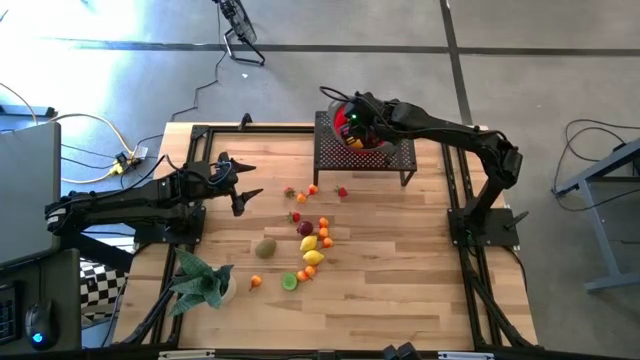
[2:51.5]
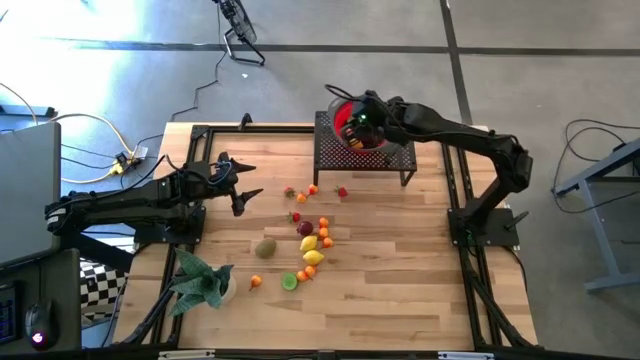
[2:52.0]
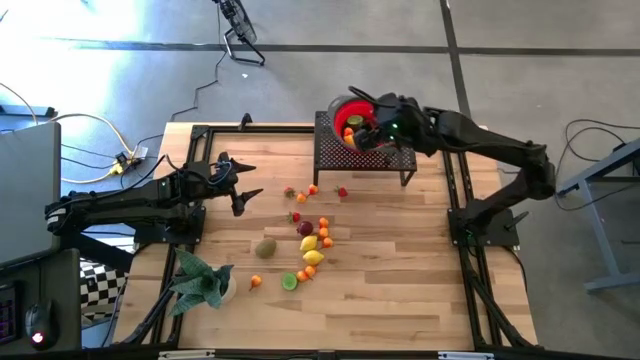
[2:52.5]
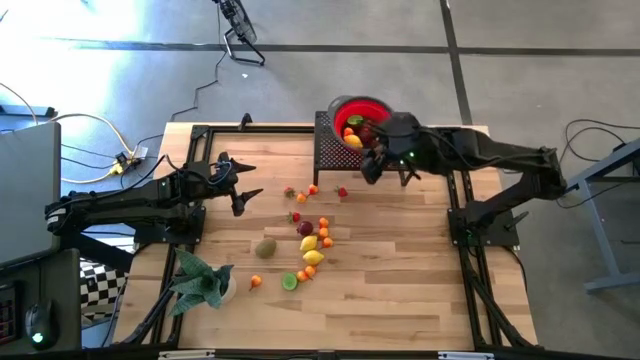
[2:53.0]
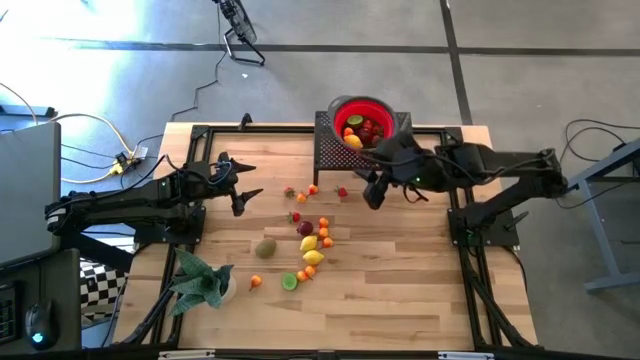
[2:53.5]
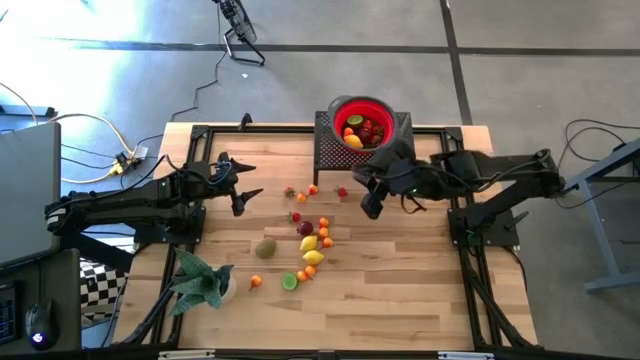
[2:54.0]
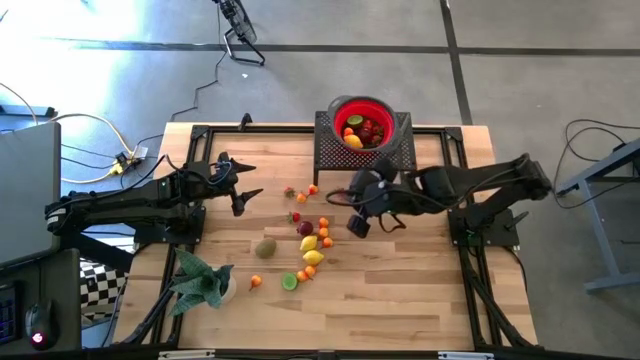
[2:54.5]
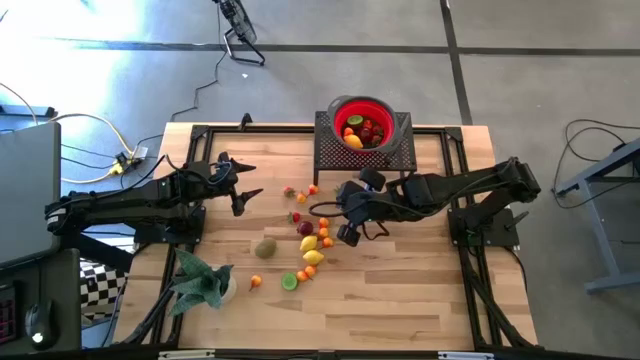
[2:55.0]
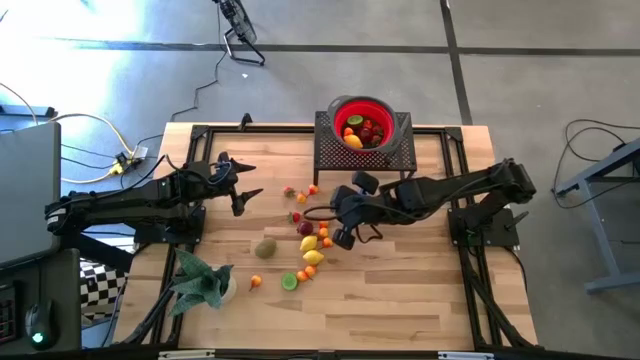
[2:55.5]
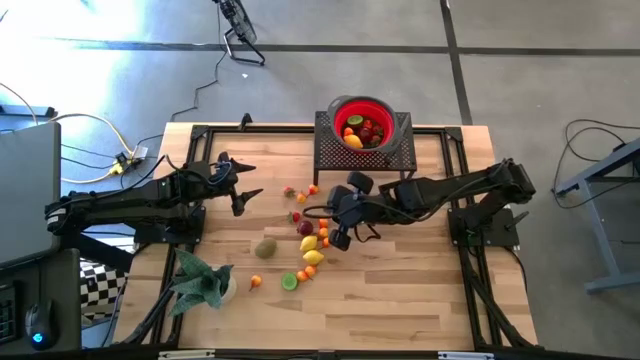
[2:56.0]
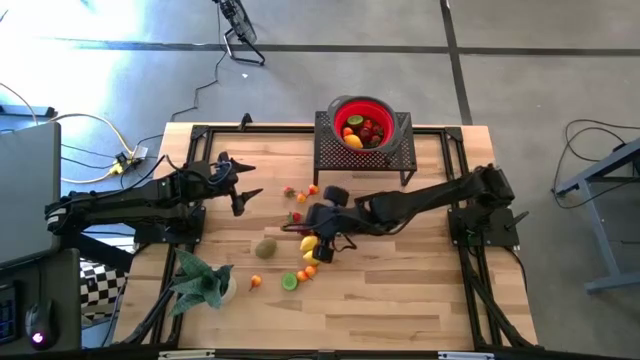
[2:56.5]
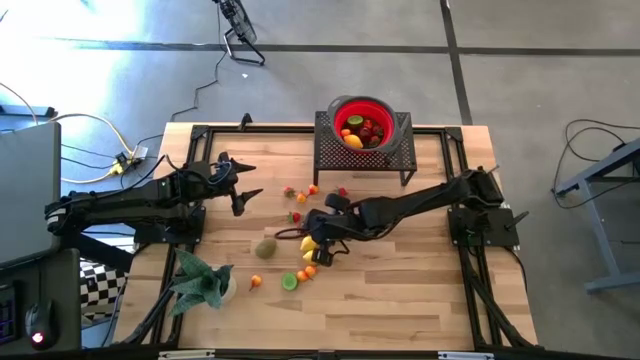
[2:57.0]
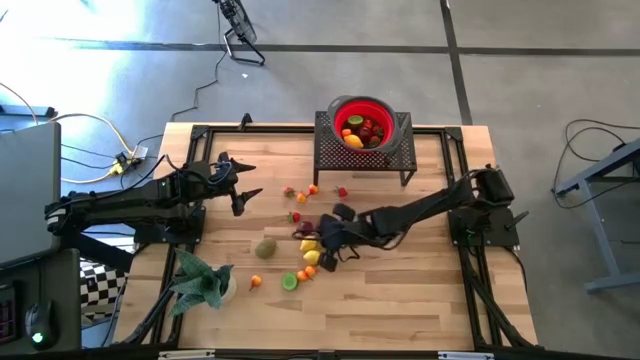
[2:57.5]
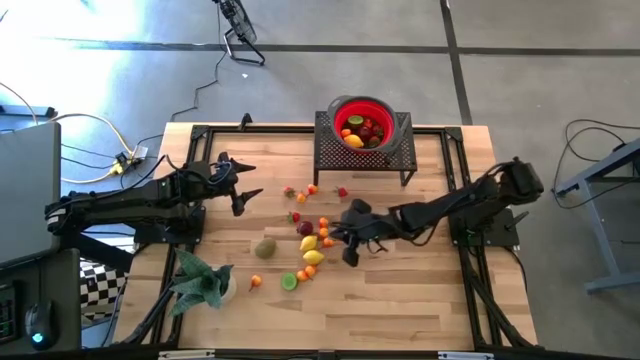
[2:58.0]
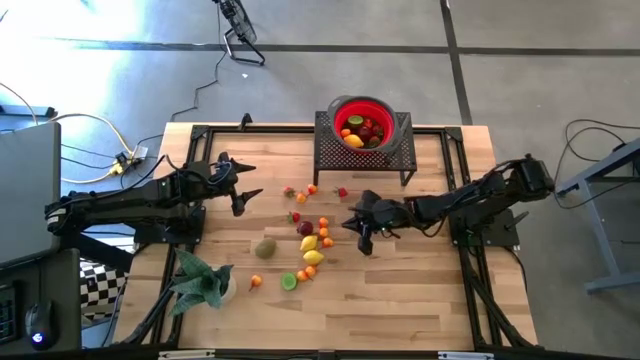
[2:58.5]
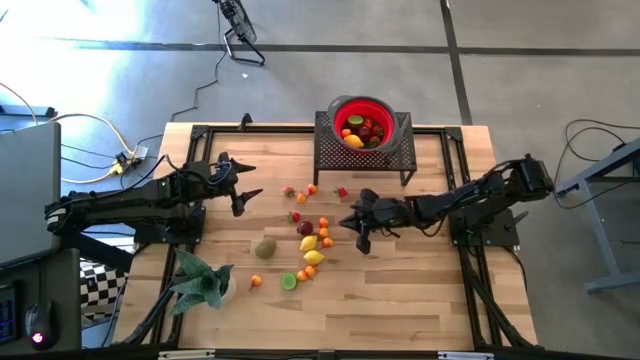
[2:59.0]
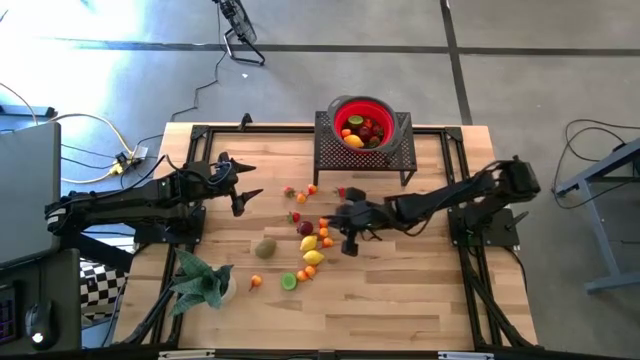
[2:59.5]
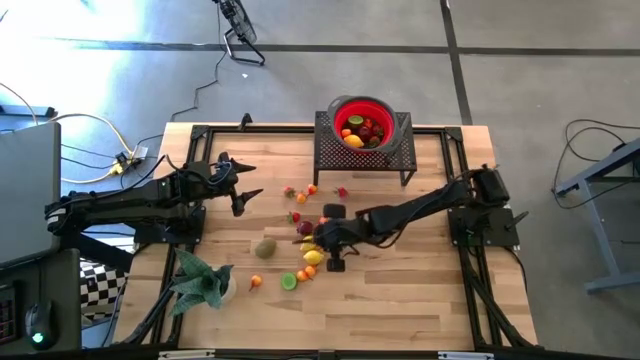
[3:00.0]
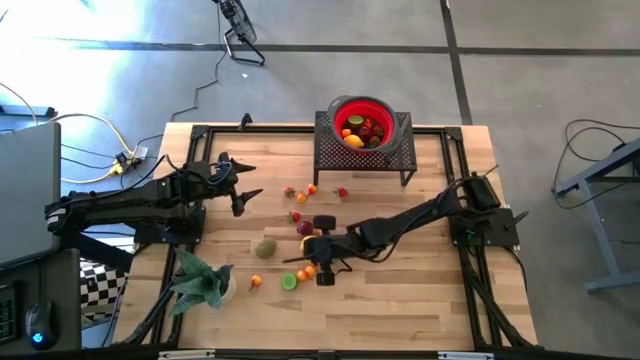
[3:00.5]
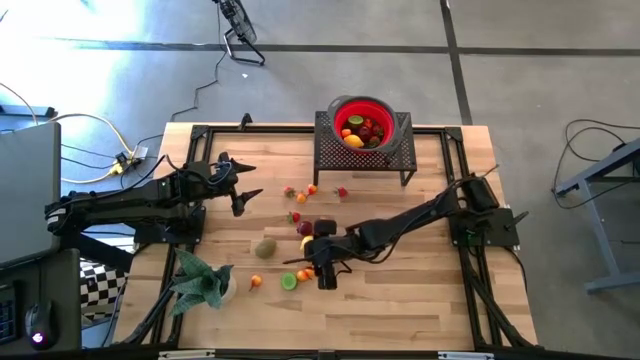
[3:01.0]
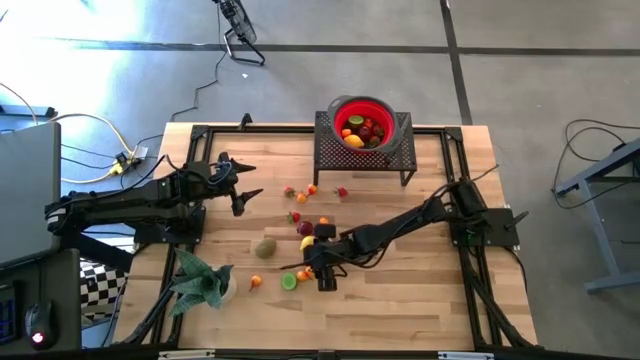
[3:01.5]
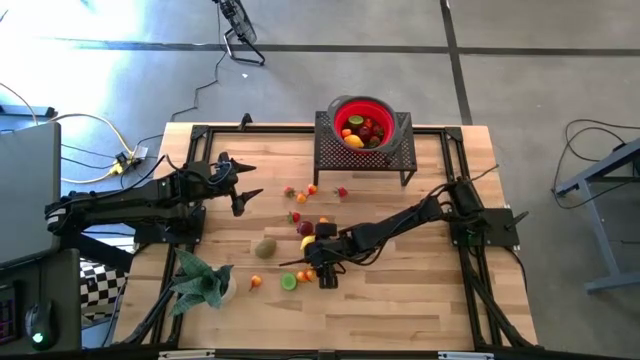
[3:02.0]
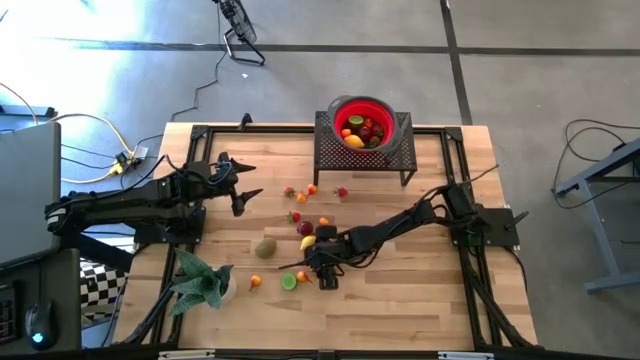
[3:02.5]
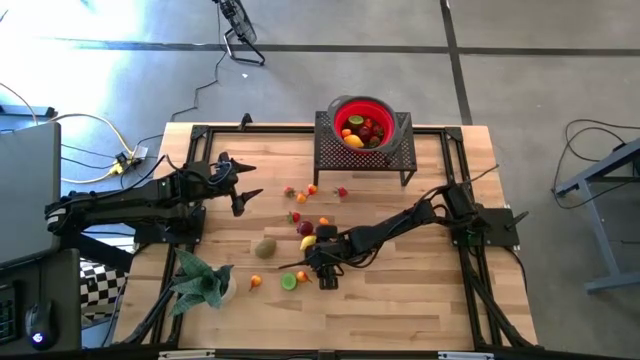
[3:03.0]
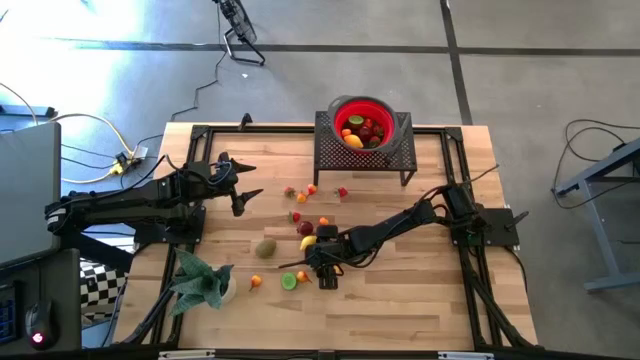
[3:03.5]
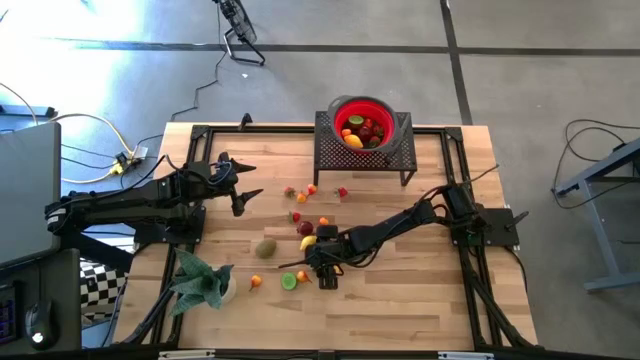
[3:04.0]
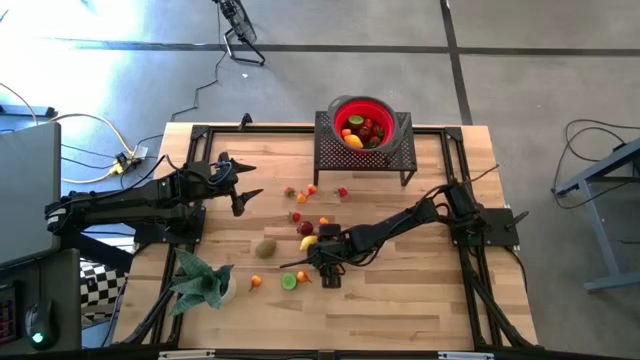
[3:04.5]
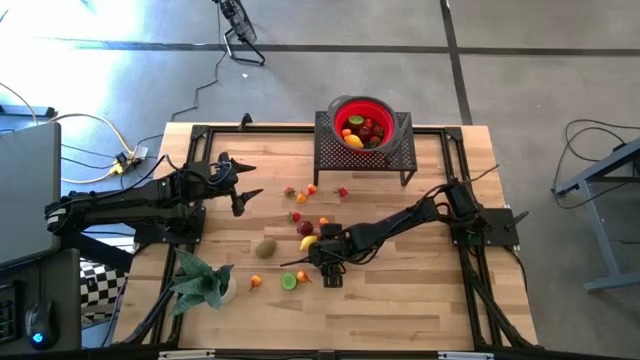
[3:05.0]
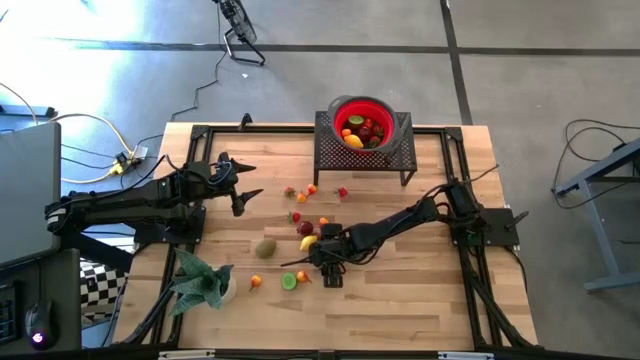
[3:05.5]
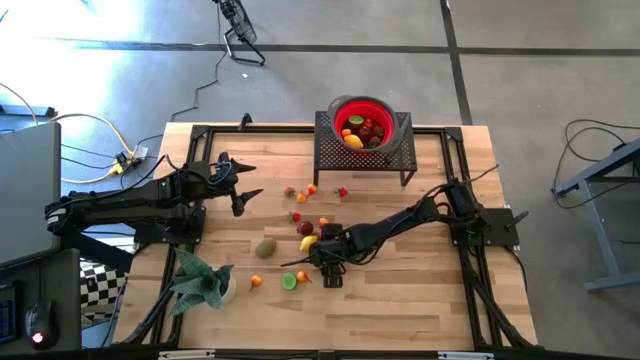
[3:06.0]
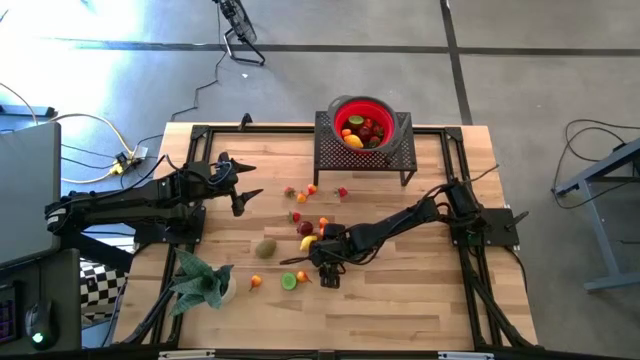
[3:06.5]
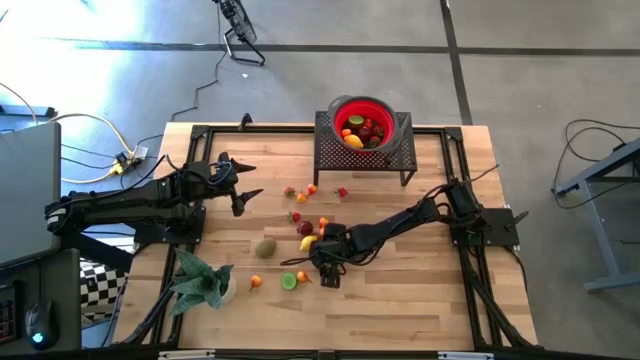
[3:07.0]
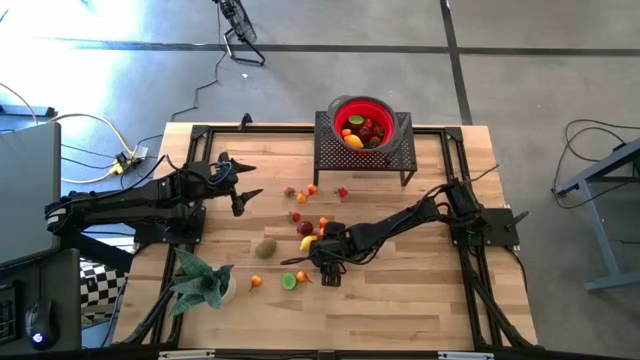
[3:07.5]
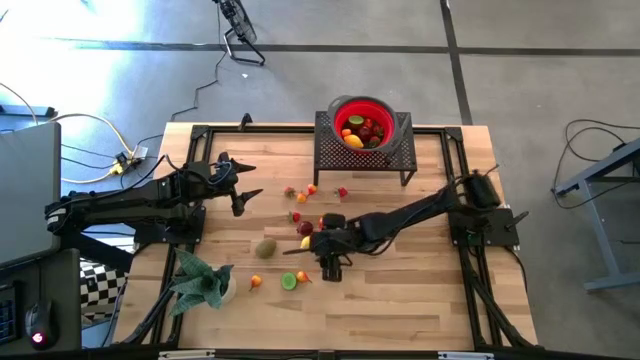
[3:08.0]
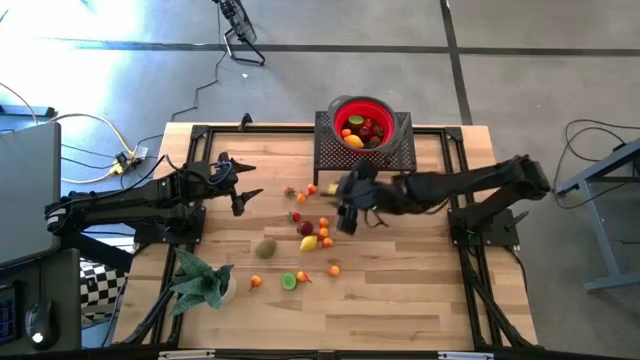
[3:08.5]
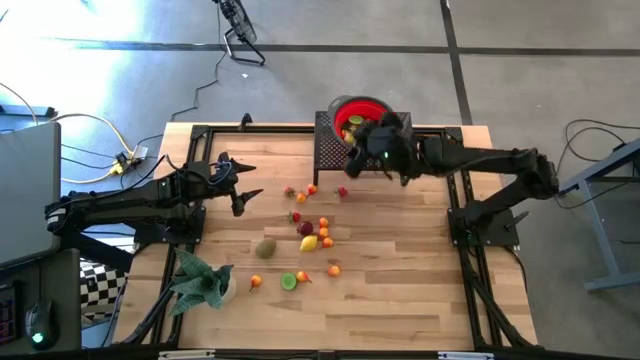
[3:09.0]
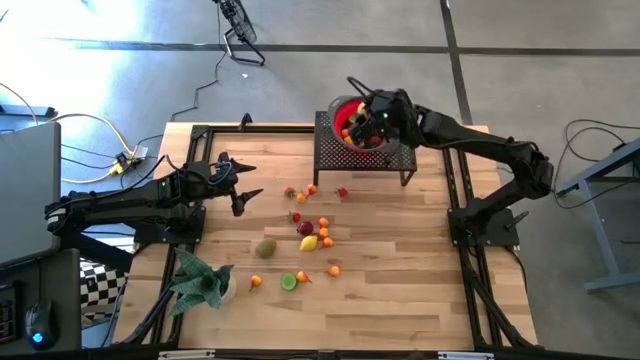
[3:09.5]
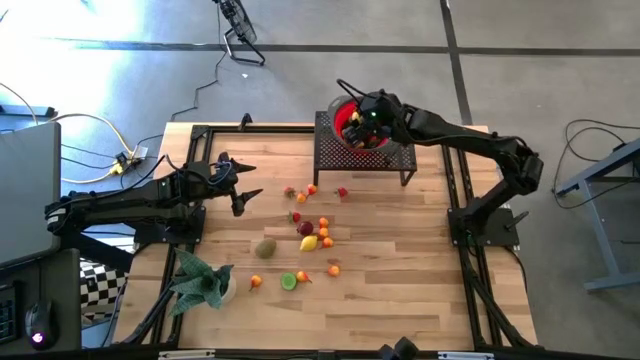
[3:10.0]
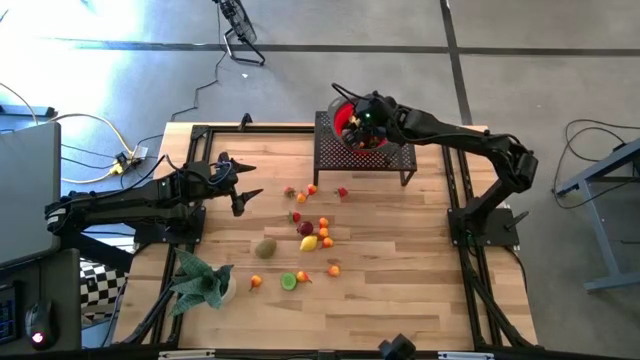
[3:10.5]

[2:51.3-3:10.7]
Task: Pick & Place Fruit
Put the lemon into the strainer on the shelf

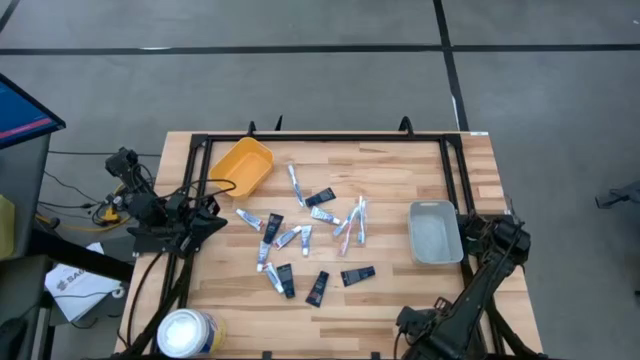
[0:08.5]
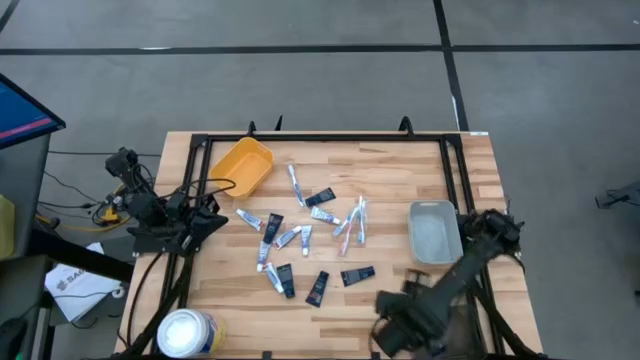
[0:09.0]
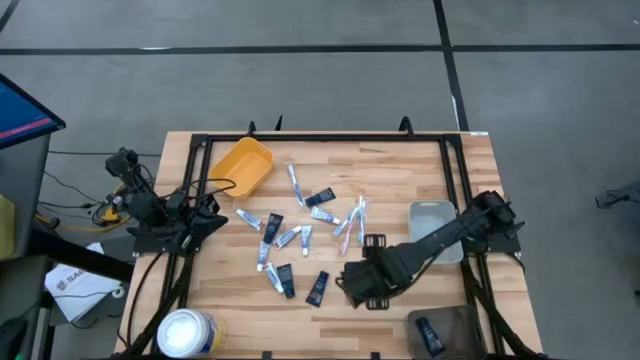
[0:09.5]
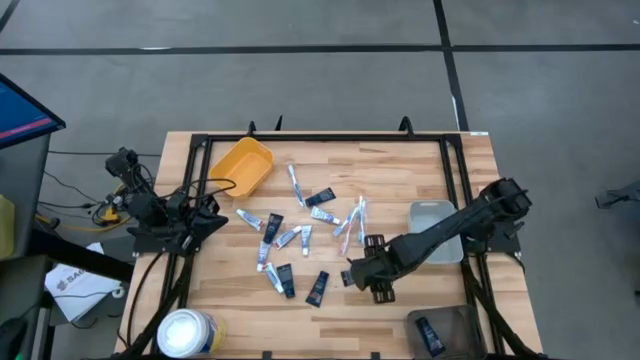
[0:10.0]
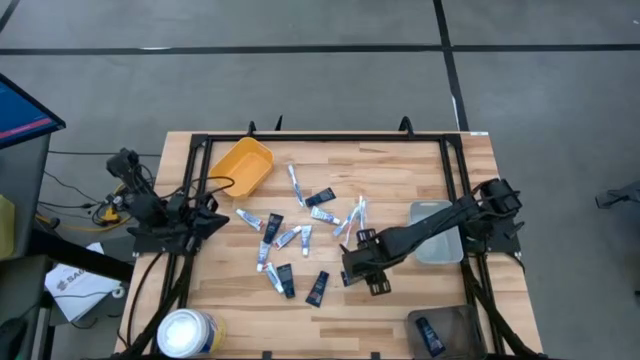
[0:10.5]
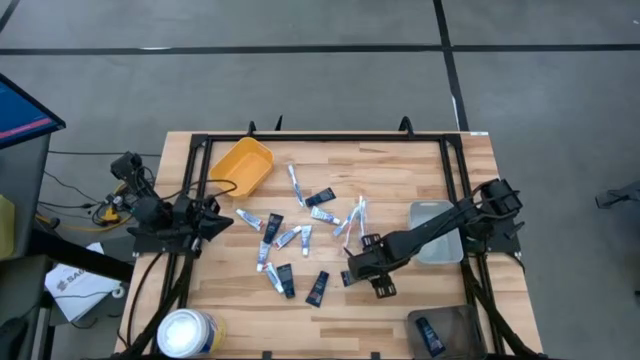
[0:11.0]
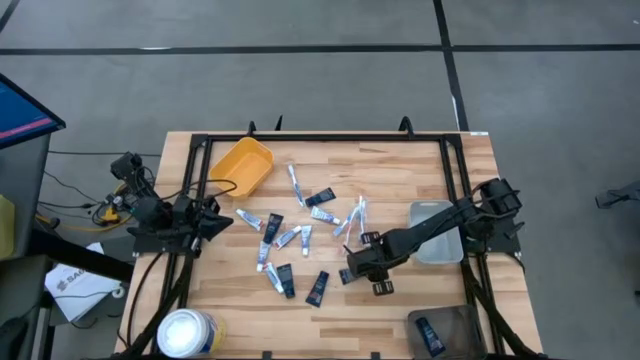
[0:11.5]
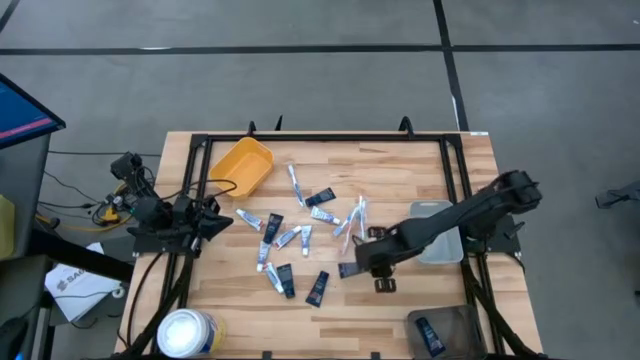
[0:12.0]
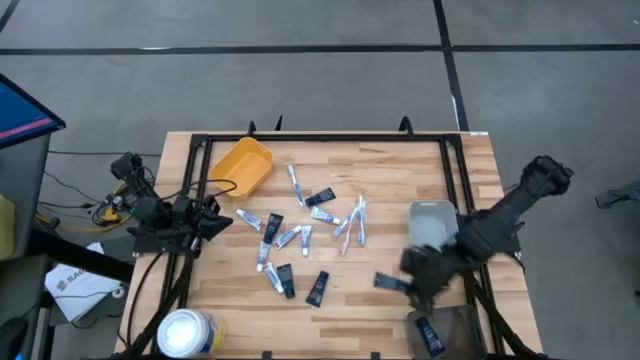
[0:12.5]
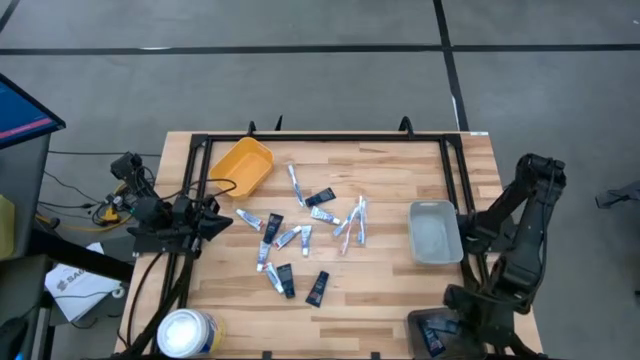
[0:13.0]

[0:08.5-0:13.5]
Task: Pick & Place Travel size toiletries
Put the blue shave cream into the black bin
